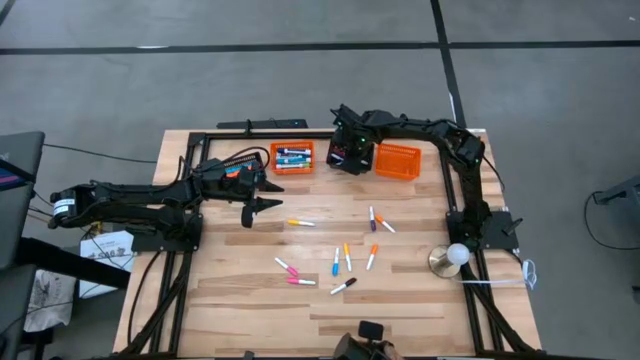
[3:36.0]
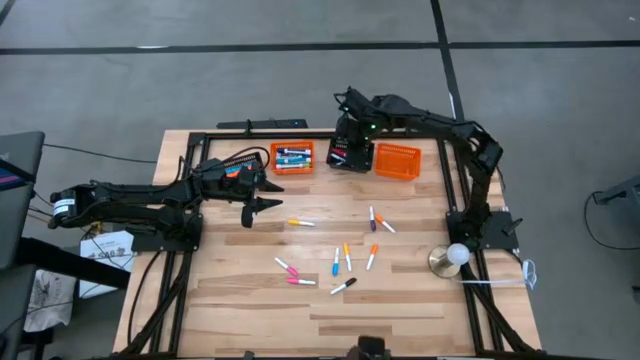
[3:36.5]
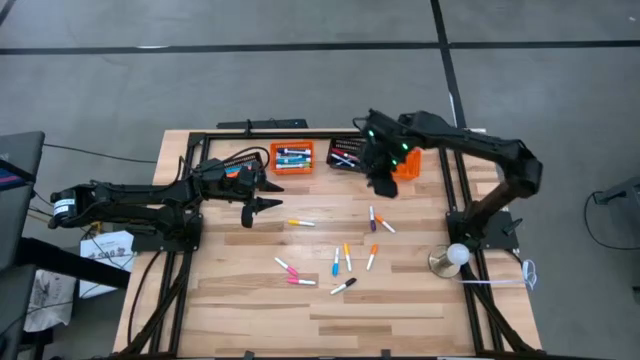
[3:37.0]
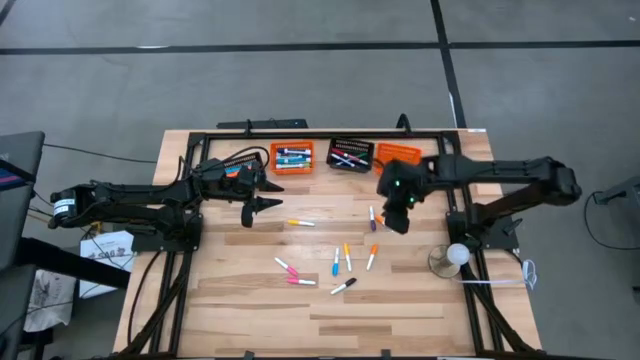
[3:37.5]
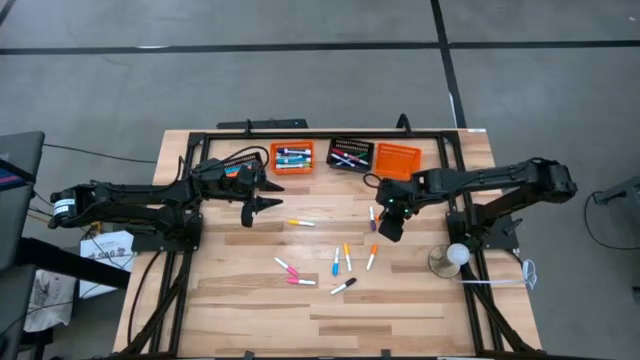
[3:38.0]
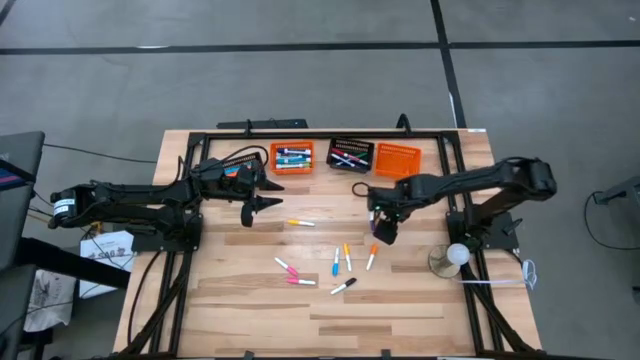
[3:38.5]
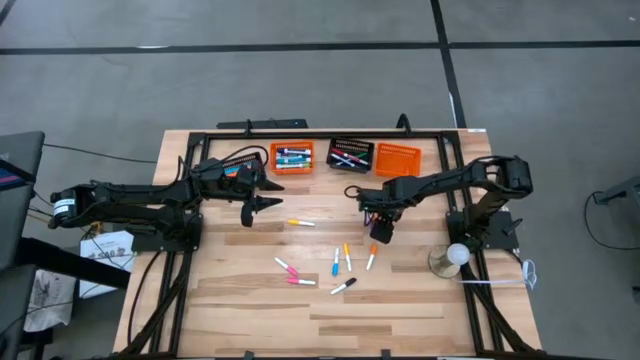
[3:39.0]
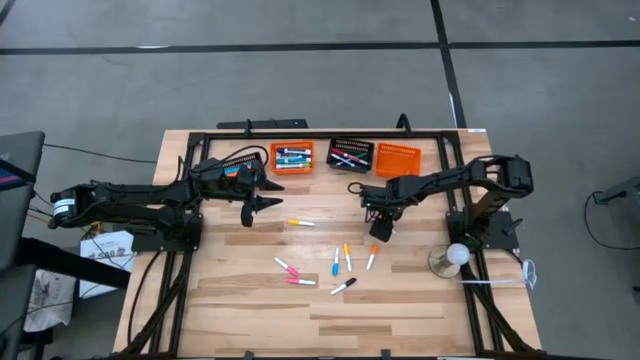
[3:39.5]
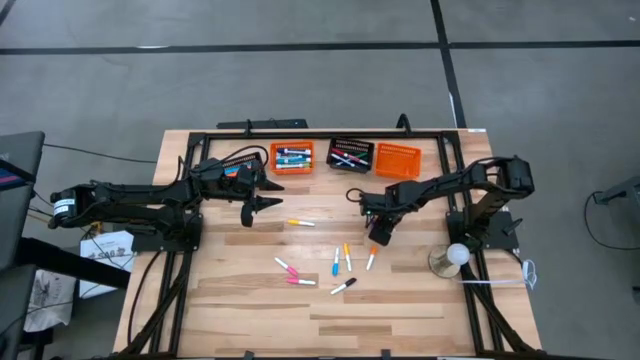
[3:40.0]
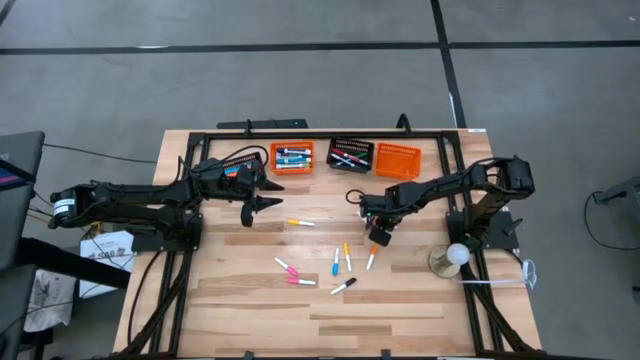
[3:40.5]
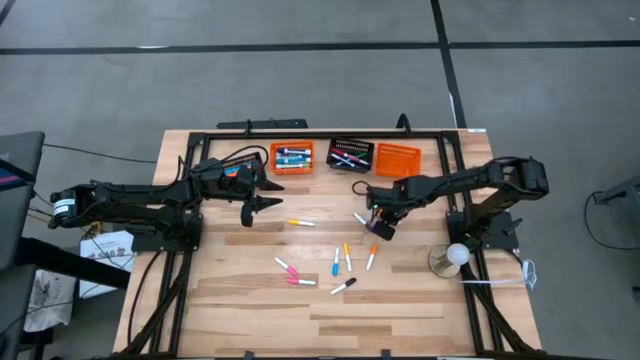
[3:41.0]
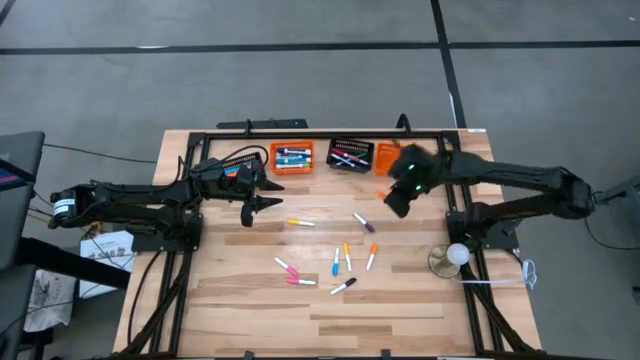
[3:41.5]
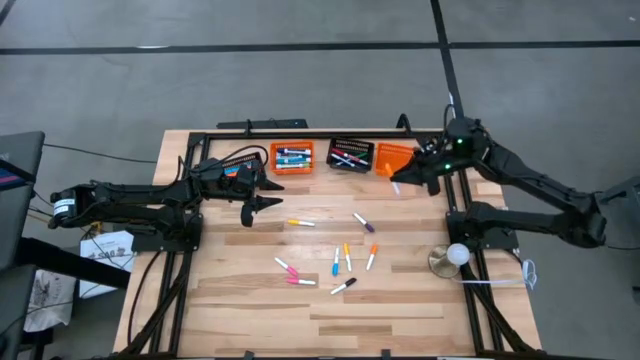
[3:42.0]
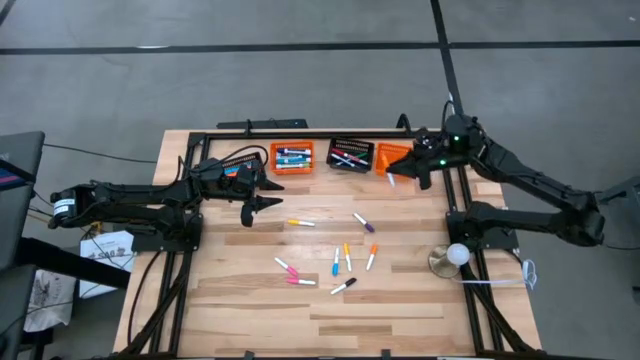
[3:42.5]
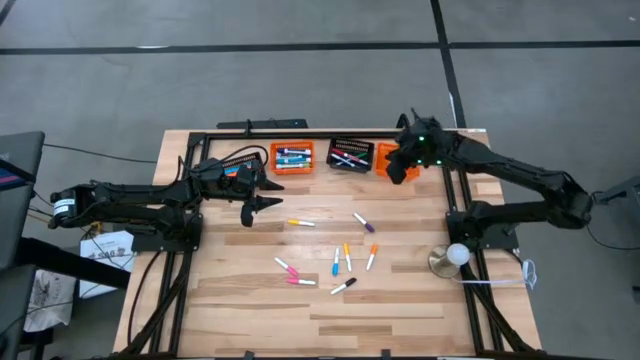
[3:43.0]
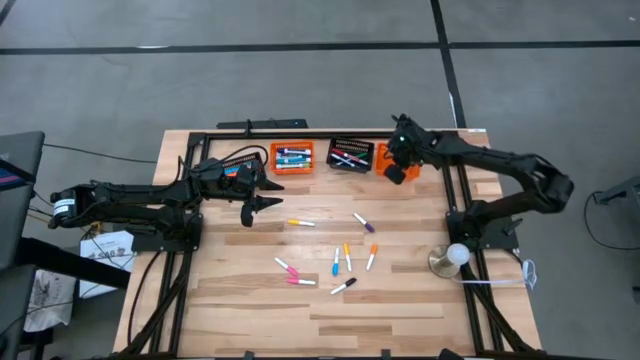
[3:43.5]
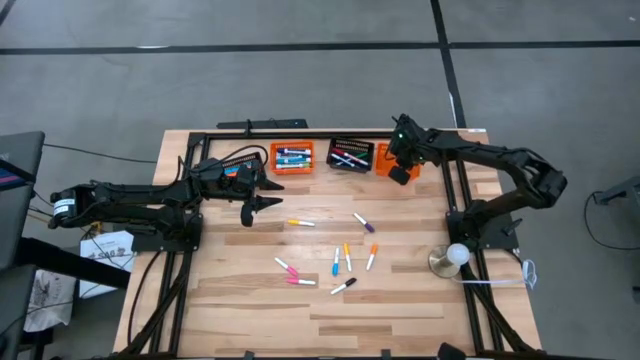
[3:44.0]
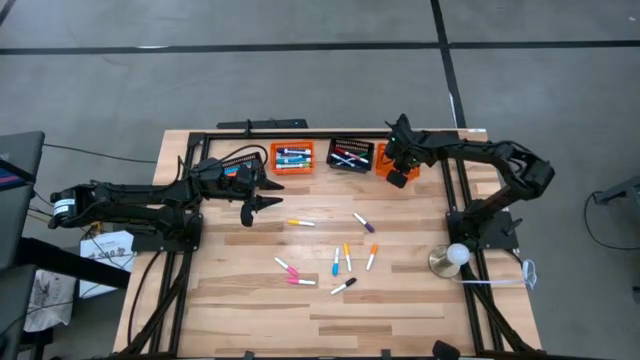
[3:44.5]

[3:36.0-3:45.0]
Task: Pick & Place Markers
Put the small orange highlighter pen into the right orange bin

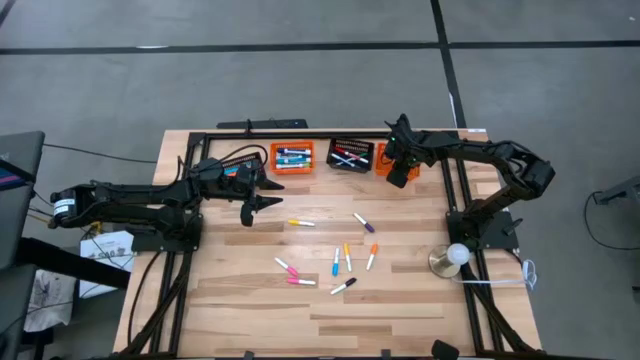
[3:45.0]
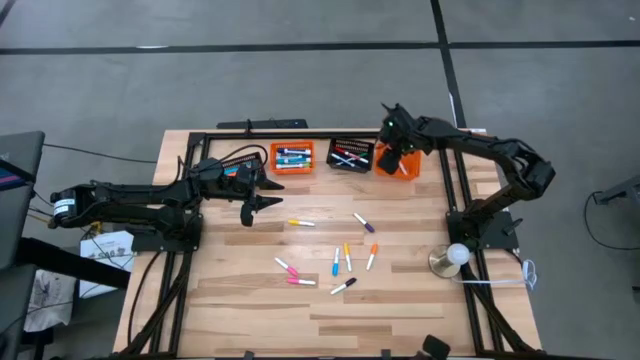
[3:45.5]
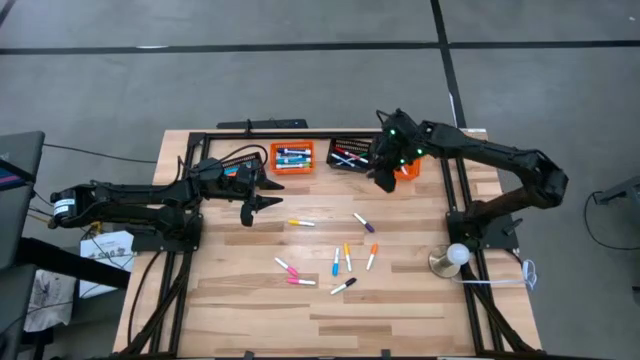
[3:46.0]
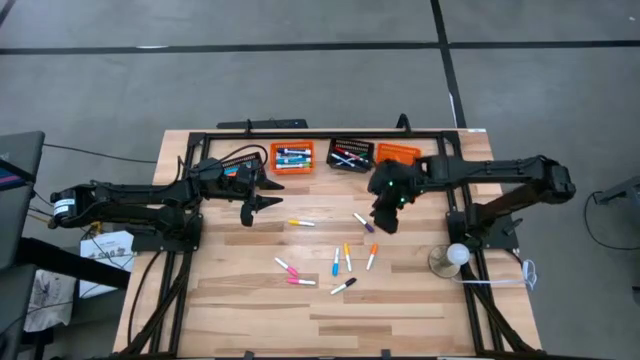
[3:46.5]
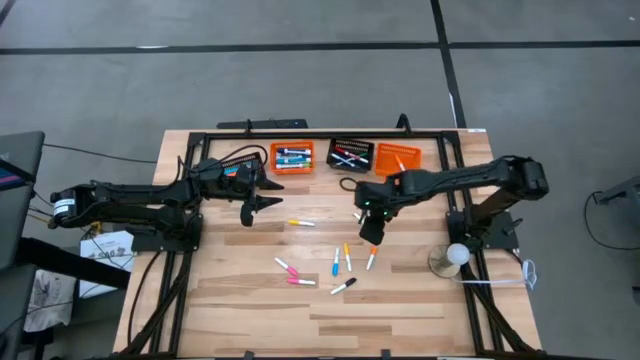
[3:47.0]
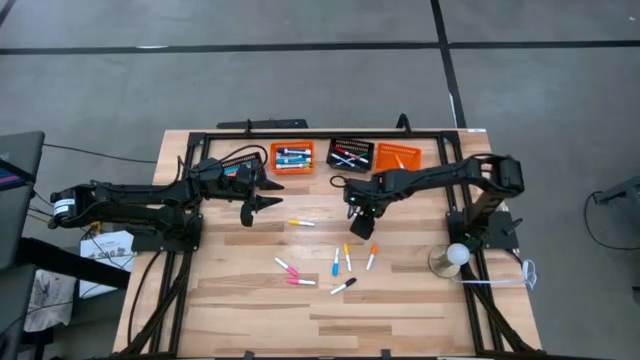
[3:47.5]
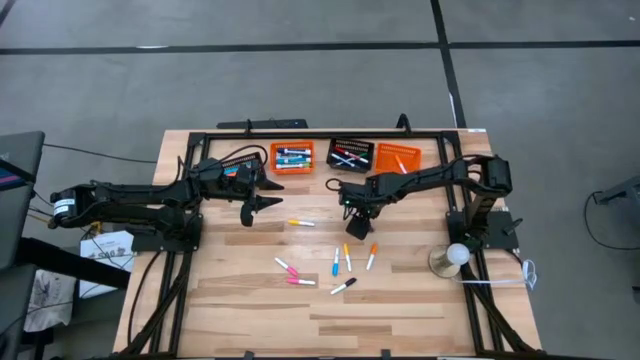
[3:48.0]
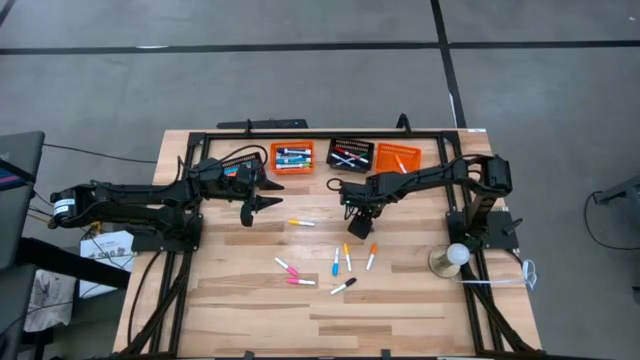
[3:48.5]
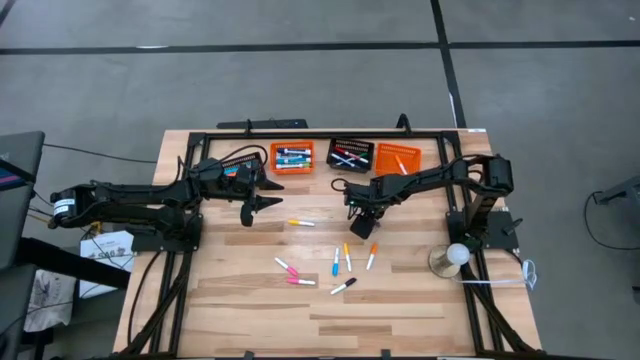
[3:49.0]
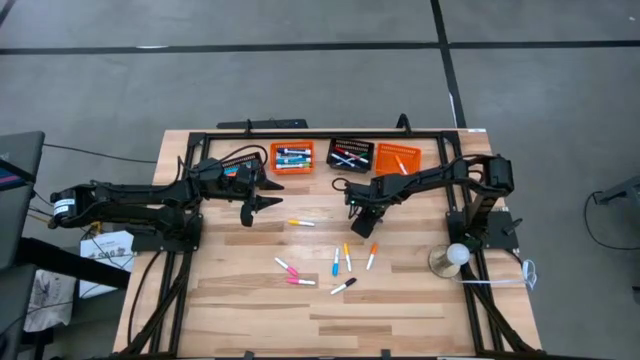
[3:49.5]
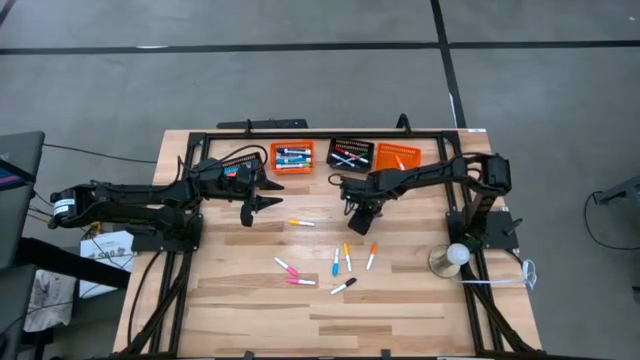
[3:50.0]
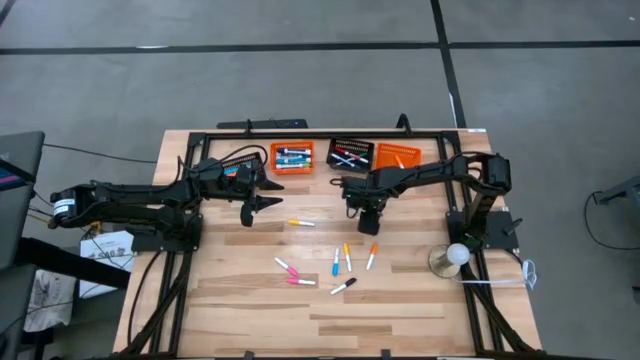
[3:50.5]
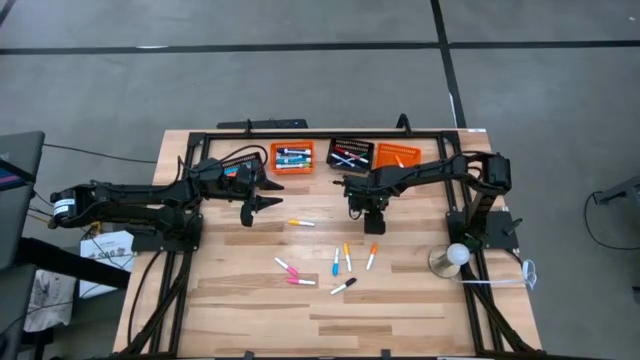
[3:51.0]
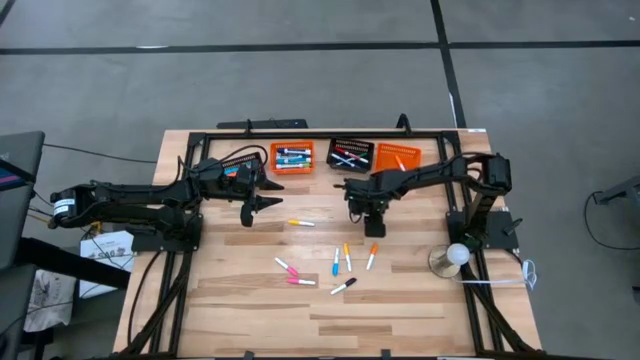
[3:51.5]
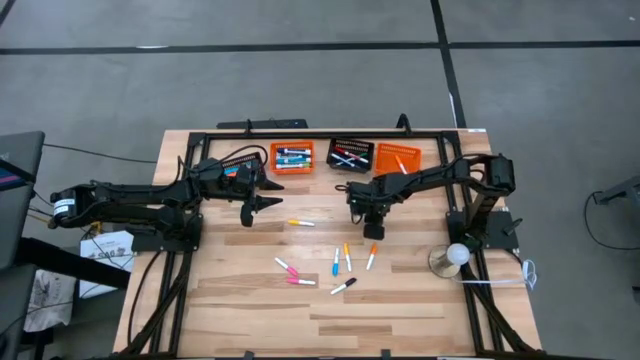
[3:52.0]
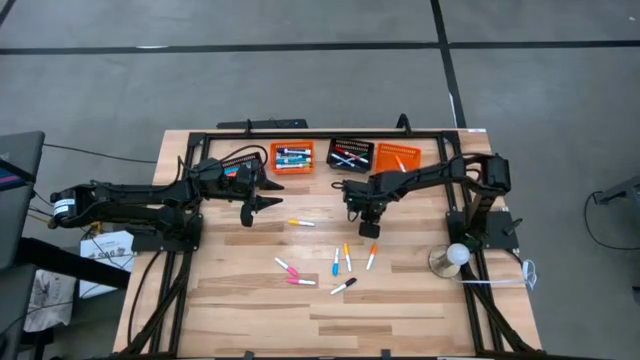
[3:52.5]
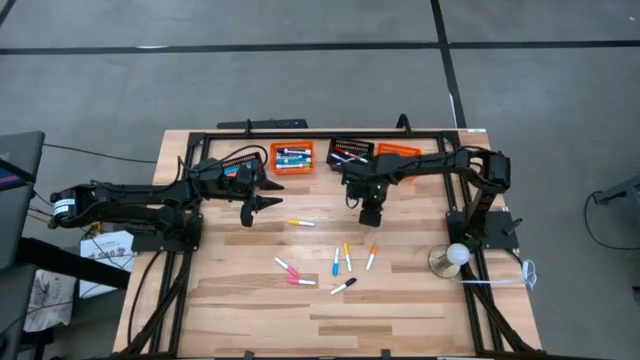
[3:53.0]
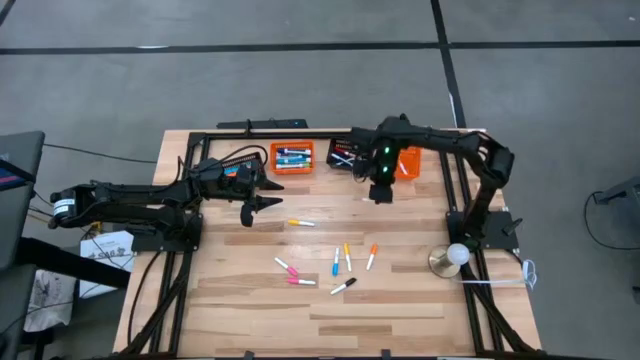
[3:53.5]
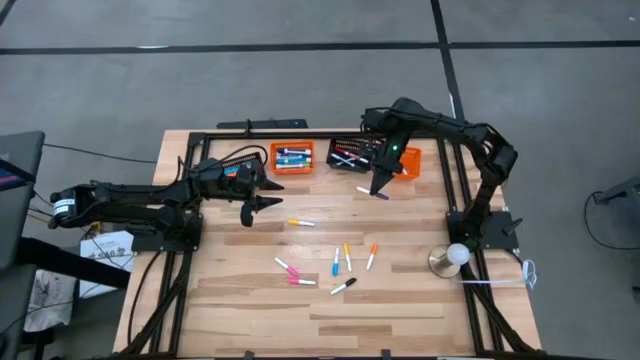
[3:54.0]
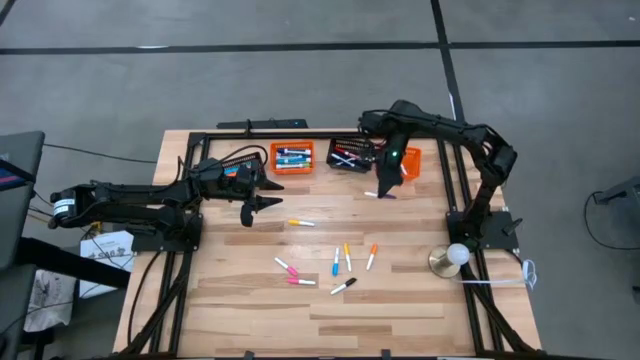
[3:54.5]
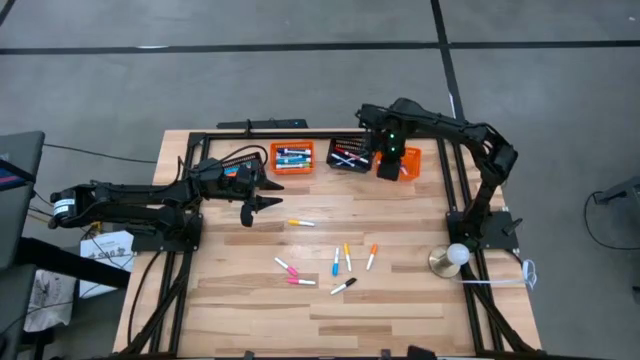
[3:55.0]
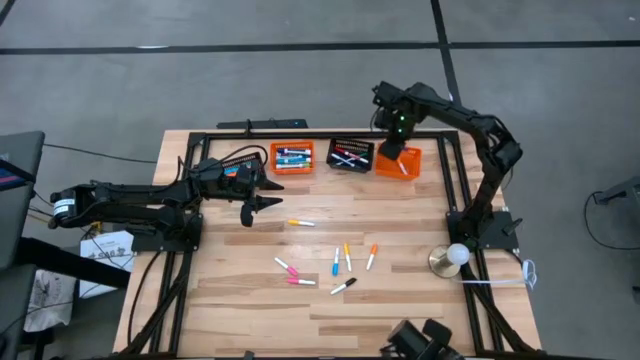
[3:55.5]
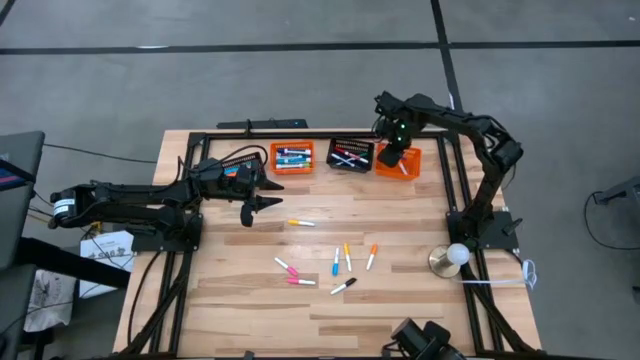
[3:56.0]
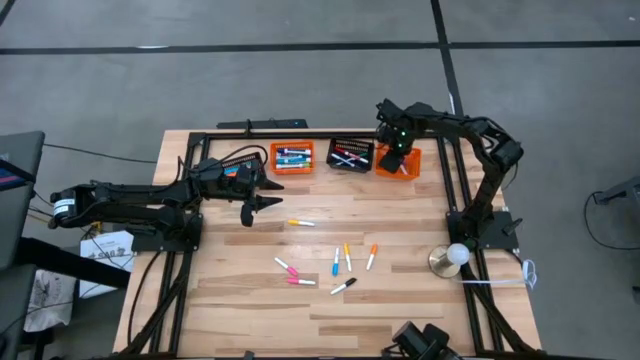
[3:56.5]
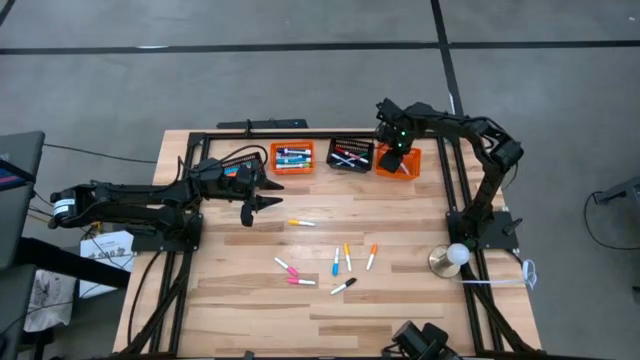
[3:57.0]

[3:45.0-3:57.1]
Put the small purple highlighter pen into the right orange bin
